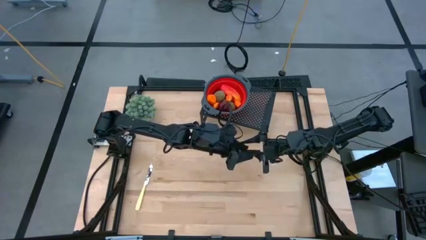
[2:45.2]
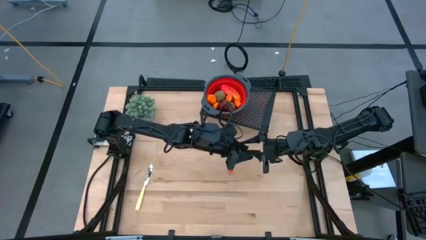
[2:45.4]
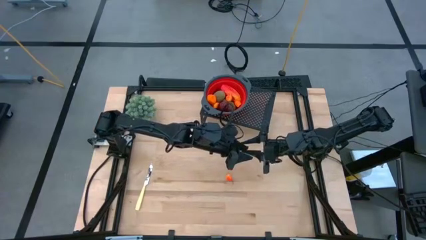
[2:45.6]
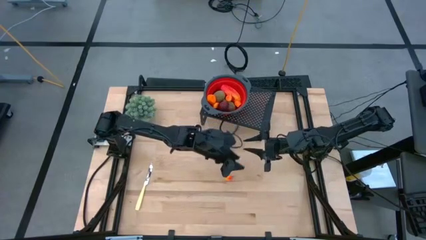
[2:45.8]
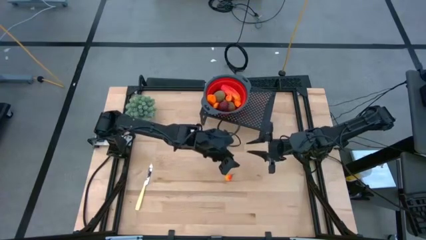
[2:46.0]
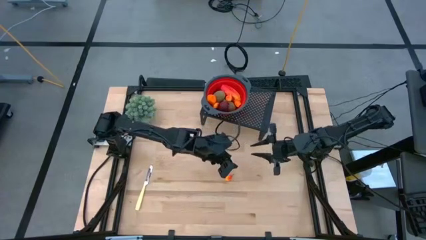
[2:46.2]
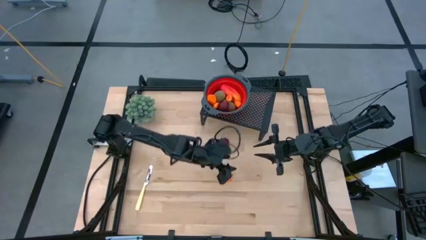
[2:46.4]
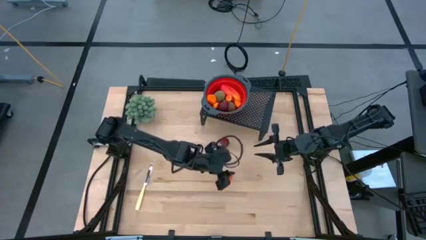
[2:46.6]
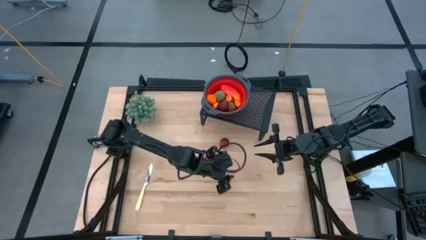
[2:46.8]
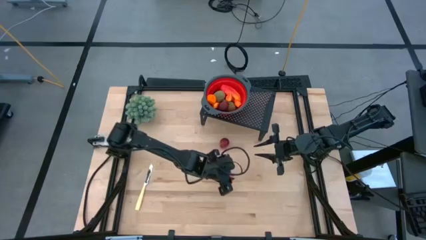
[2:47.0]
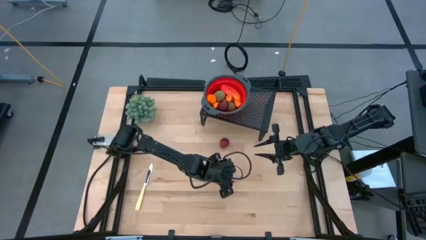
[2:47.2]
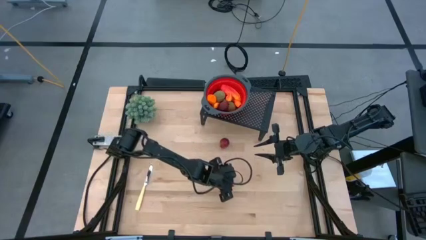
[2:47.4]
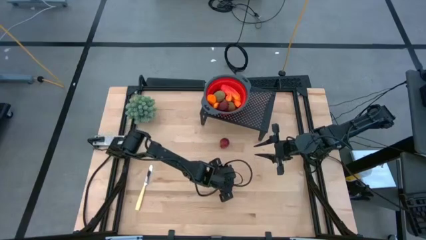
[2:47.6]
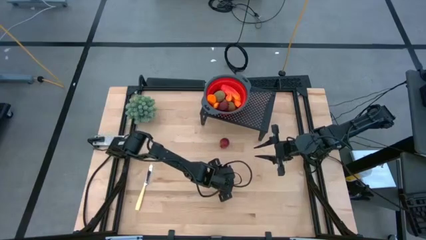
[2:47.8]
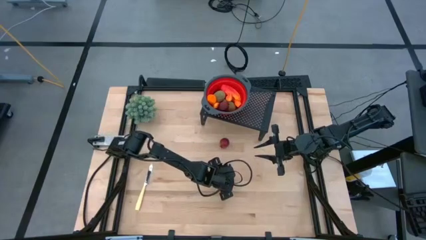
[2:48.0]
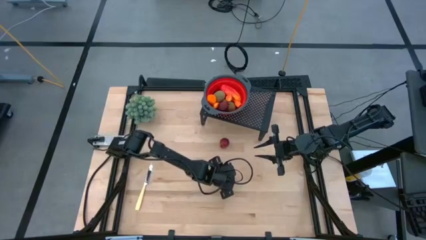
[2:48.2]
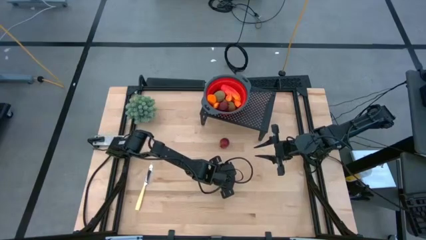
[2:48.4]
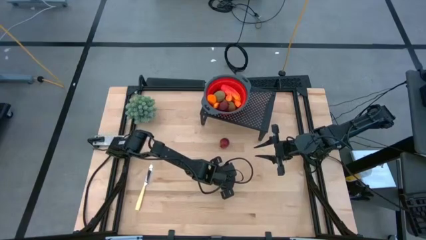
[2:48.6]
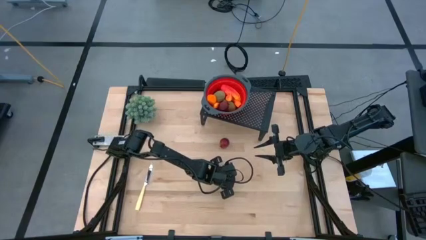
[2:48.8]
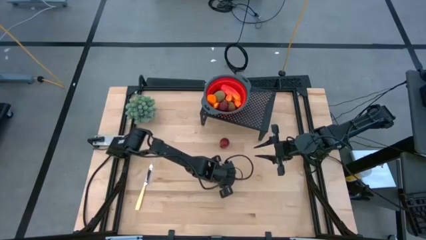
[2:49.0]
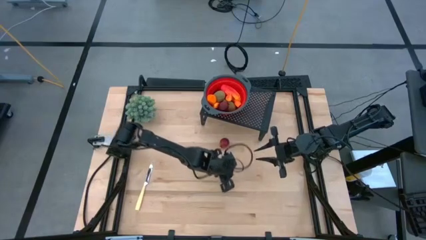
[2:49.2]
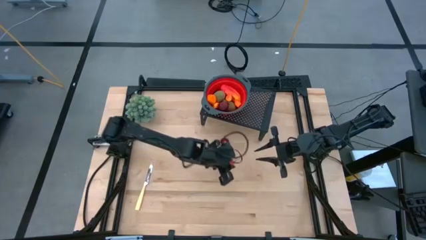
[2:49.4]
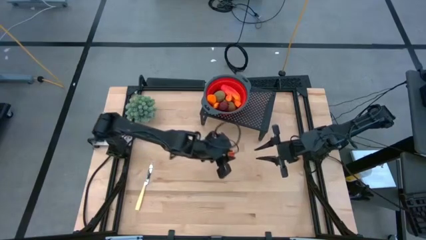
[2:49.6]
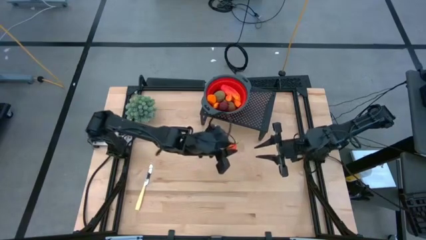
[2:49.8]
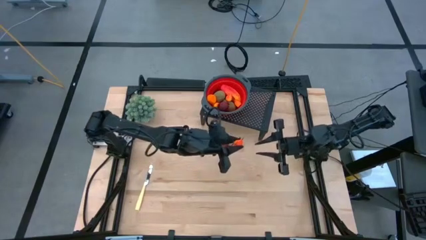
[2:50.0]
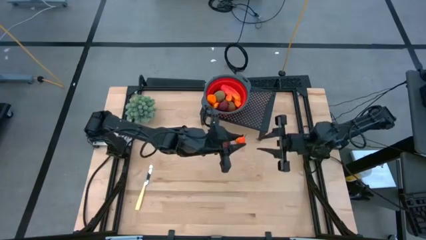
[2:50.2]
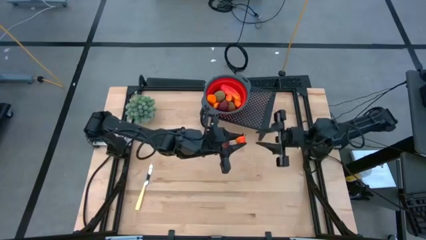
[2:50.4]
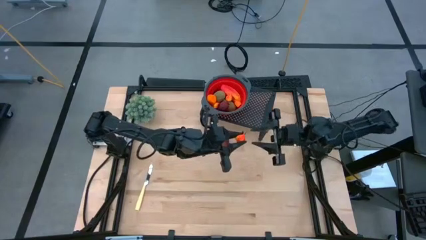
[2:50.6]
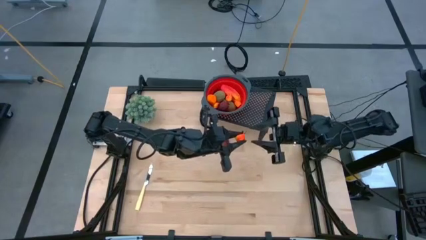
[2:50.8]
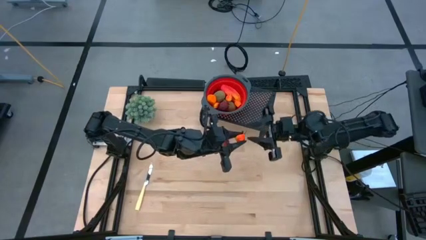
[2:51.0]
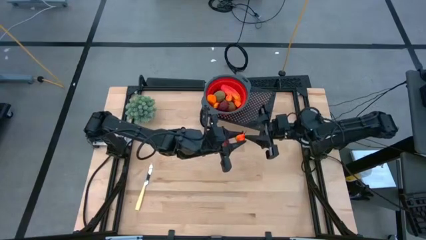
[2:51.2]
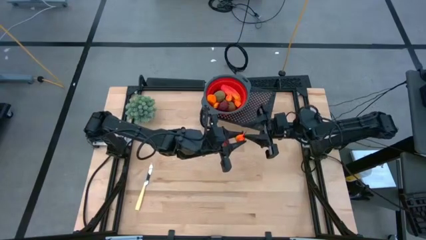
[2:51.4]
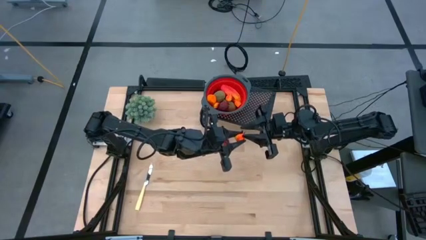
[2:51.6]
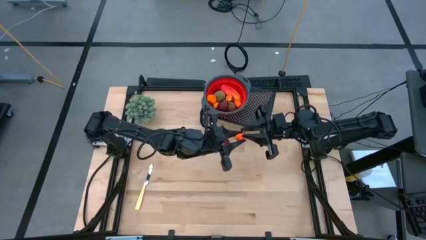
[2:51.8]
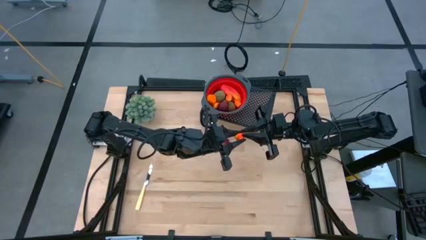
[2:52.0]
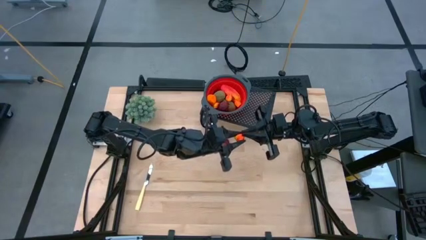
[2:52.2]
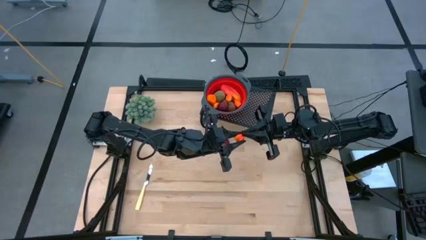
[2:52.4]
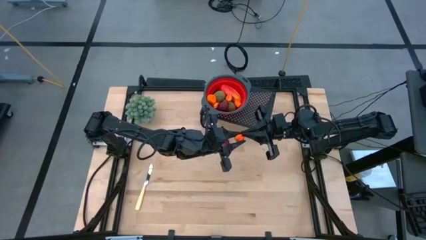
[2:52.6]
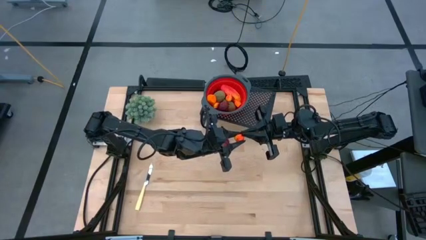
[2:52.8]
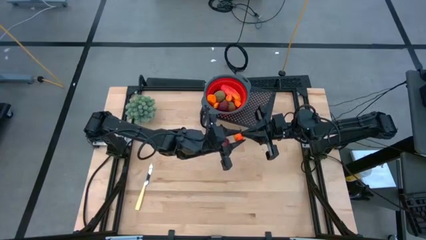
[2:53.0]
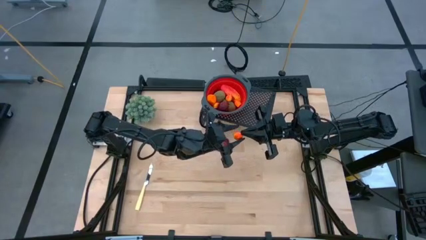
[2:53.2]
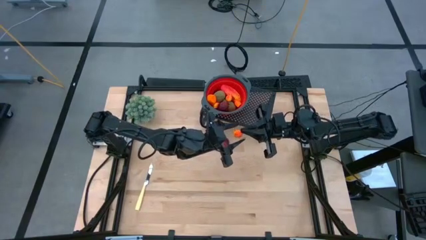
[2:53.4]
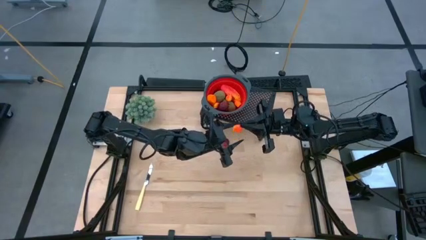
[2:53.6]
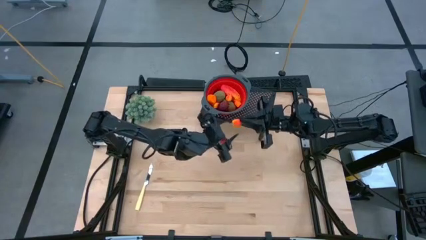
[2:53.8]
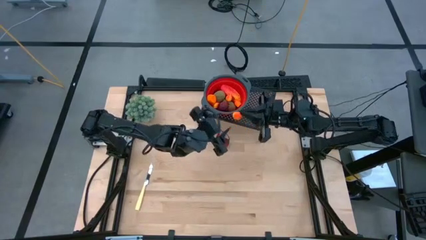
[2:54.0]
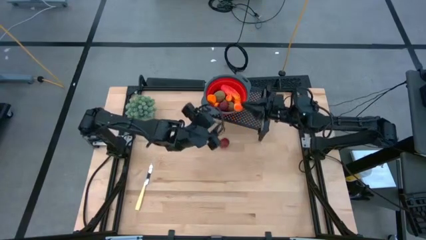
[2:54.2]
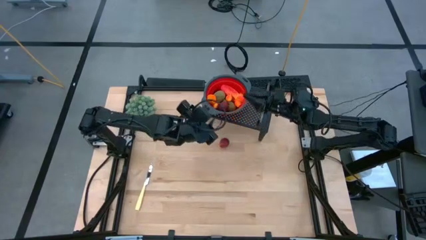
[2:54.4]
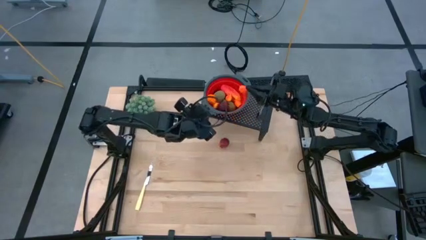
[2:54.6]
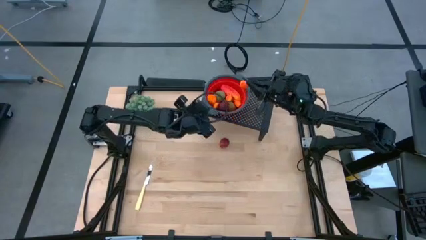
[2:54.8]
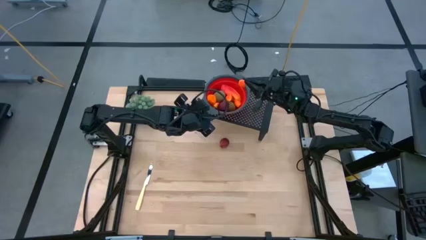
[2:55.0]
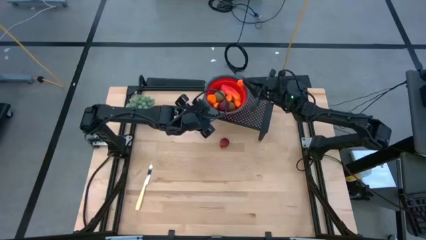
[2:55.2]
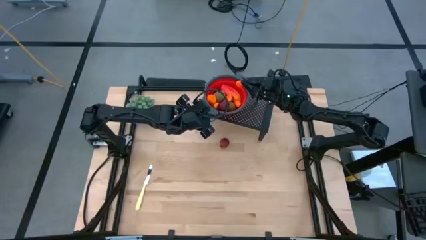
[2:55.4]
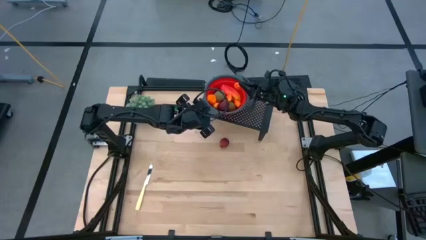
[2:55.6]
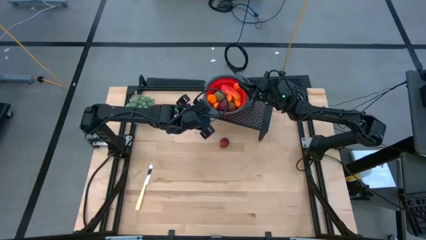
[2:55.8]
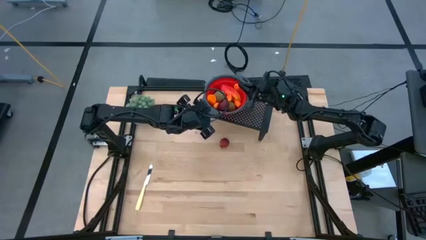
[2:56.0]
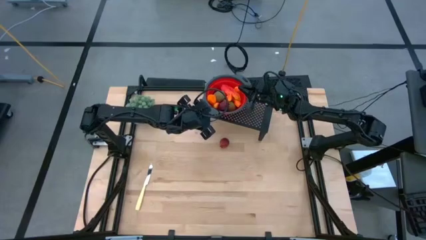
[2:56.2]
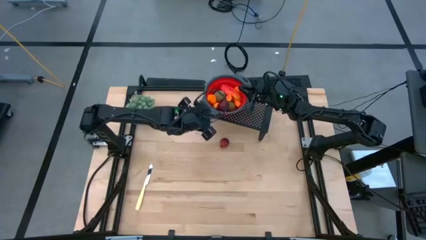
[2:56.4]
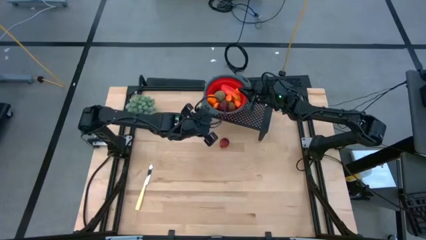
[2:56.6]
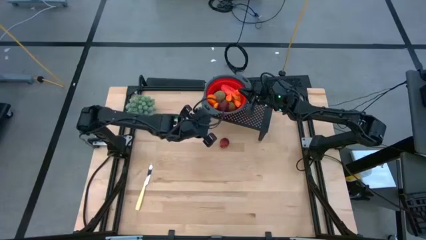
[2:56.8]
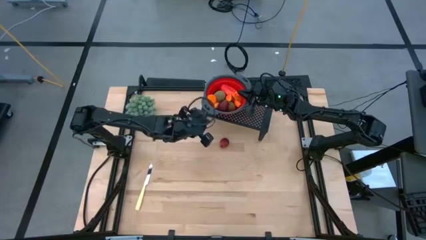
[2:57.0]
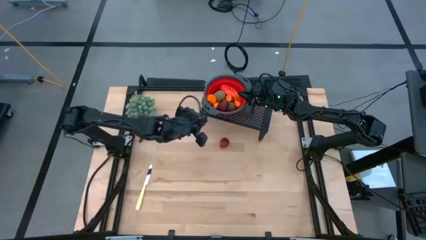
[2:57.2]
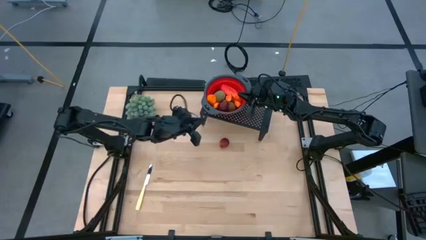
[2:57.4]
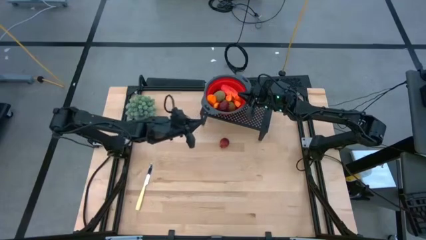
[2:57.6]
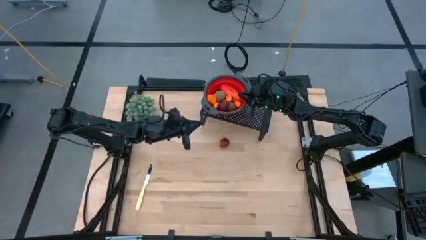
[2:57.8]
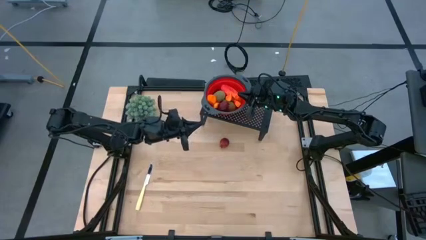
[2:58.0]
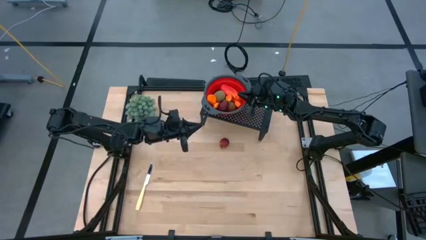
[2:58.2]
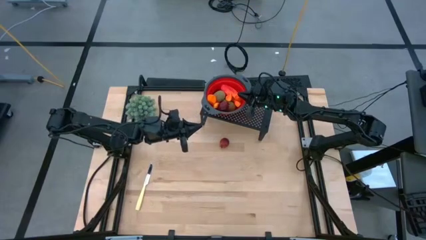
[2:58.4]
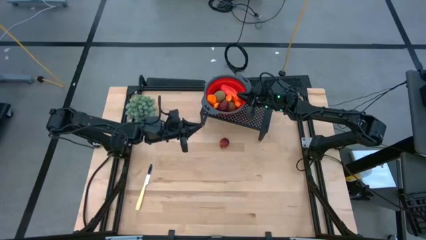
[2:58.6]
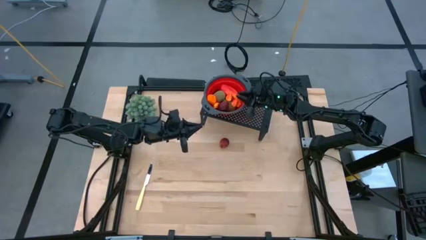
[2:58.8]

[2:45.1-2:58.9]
Task: Pick & Place Fruit
Put the pear into the red strainer bowl on the shelf
